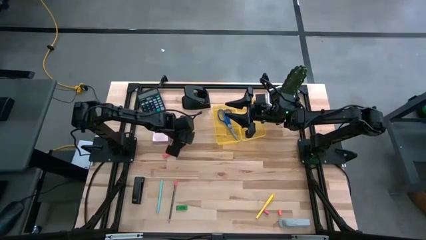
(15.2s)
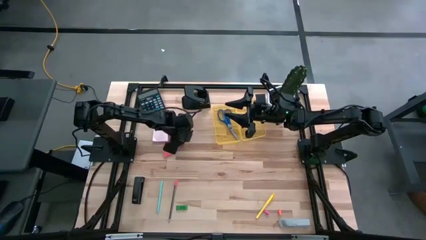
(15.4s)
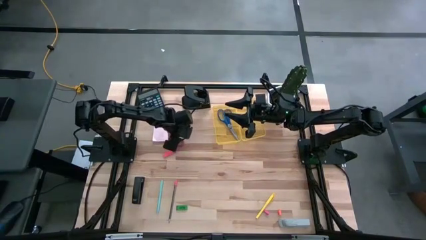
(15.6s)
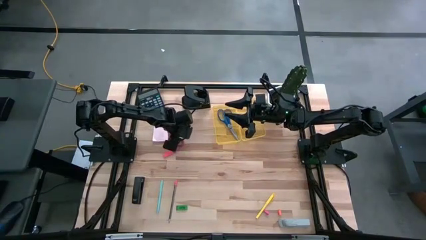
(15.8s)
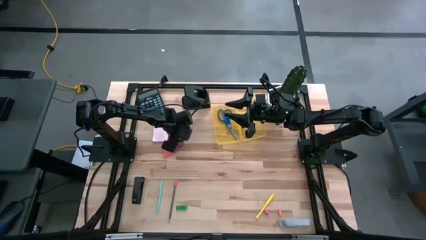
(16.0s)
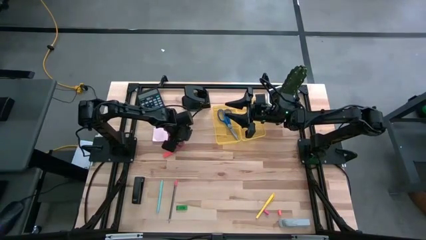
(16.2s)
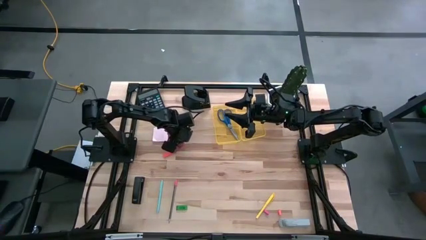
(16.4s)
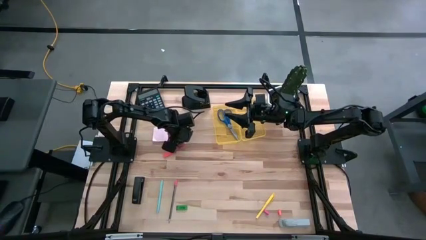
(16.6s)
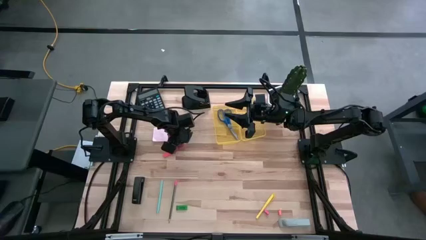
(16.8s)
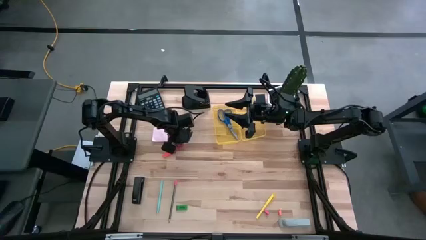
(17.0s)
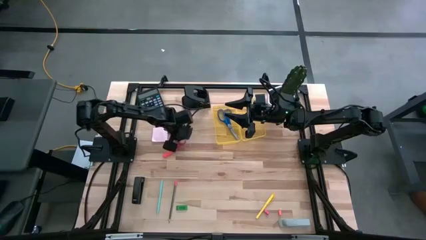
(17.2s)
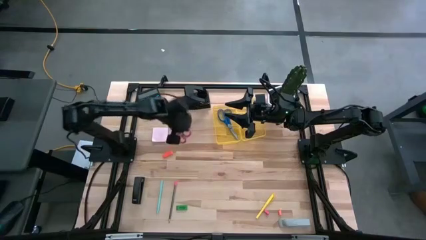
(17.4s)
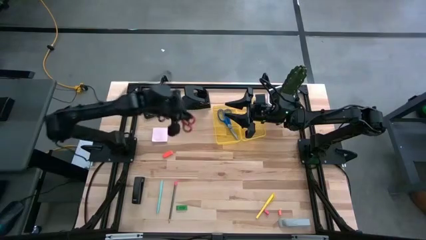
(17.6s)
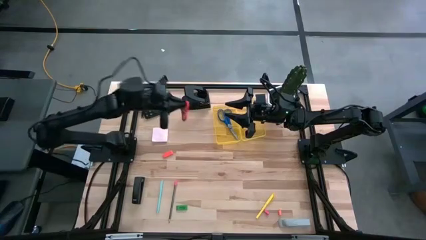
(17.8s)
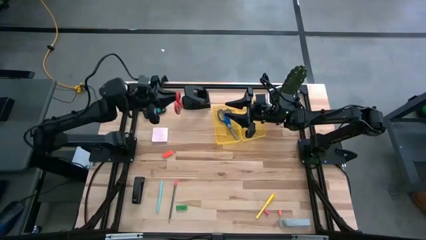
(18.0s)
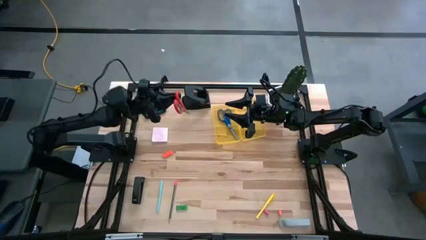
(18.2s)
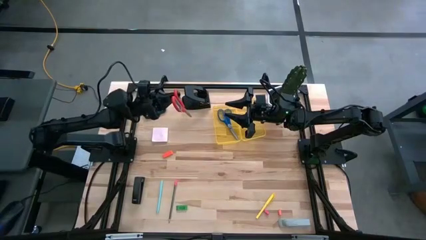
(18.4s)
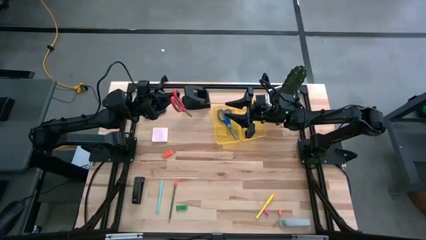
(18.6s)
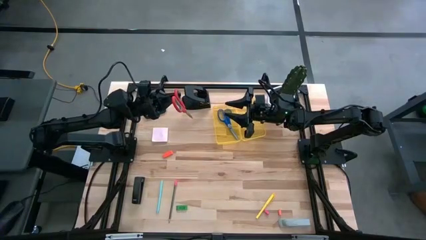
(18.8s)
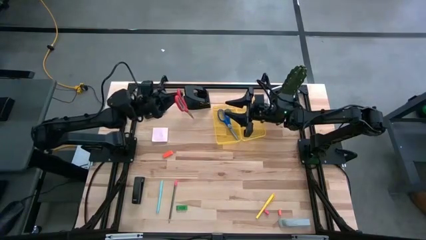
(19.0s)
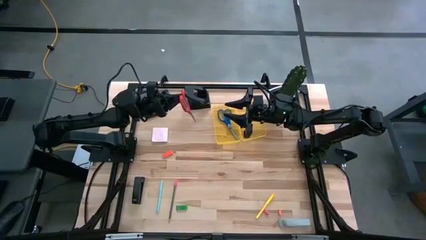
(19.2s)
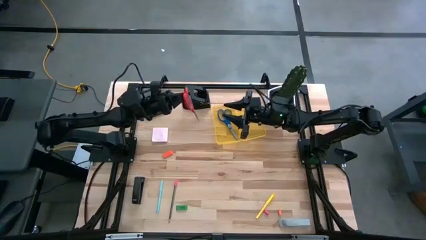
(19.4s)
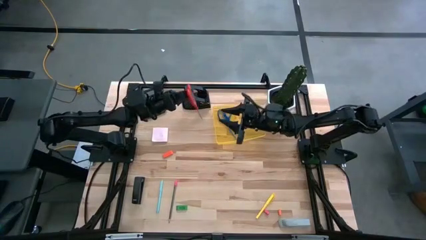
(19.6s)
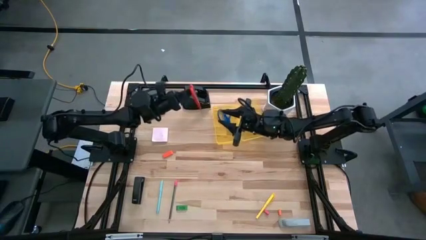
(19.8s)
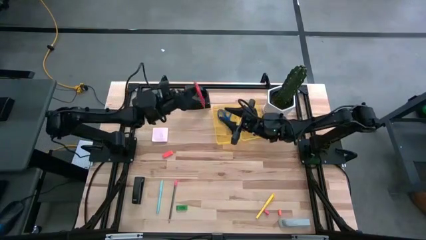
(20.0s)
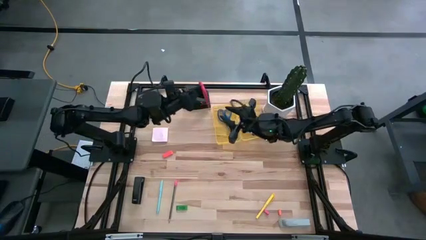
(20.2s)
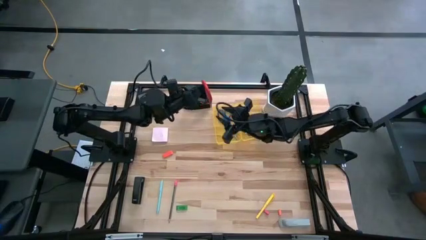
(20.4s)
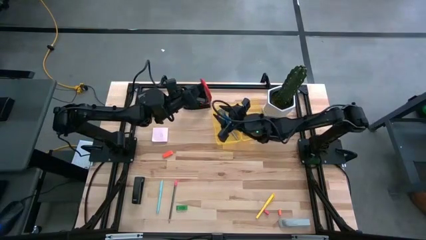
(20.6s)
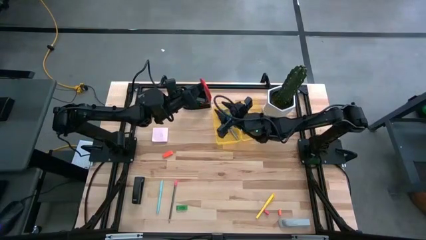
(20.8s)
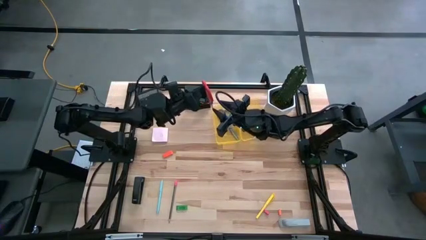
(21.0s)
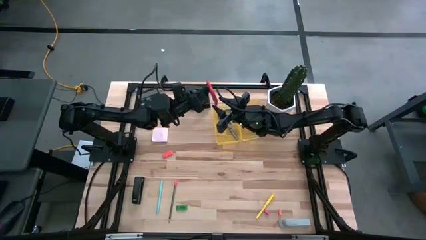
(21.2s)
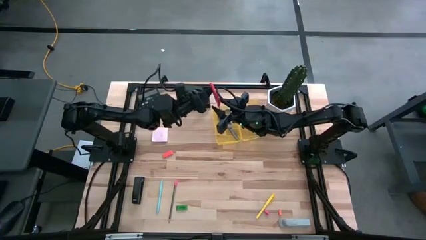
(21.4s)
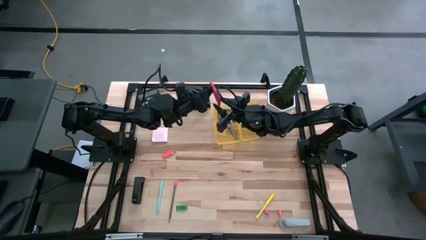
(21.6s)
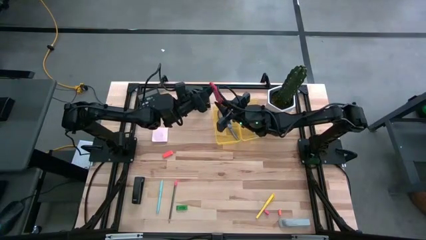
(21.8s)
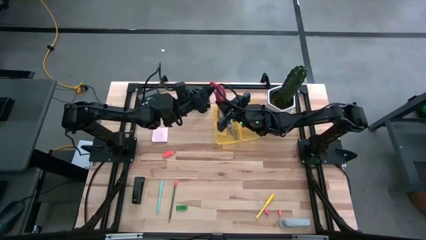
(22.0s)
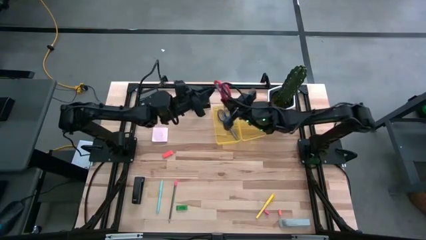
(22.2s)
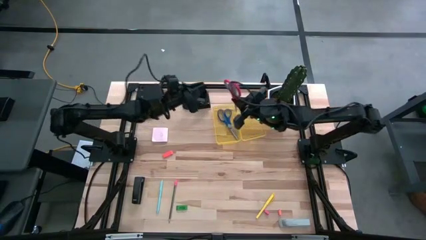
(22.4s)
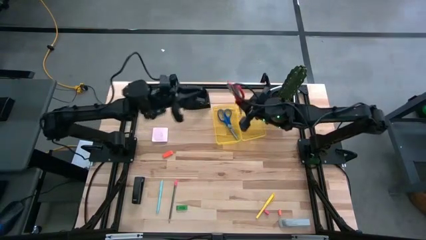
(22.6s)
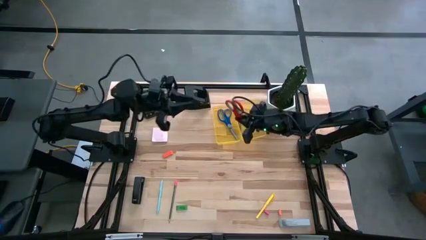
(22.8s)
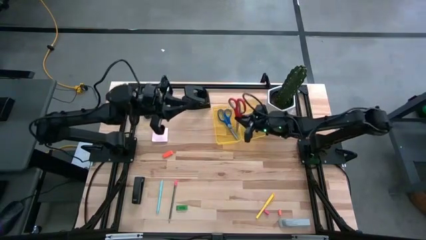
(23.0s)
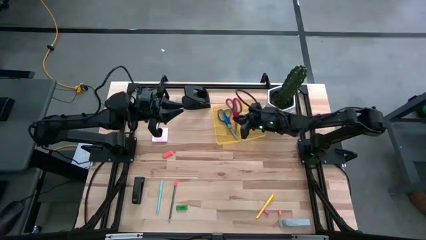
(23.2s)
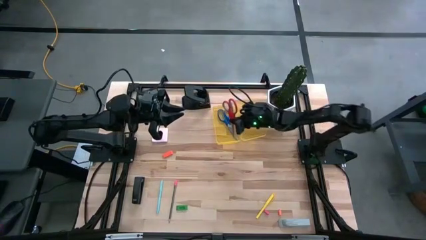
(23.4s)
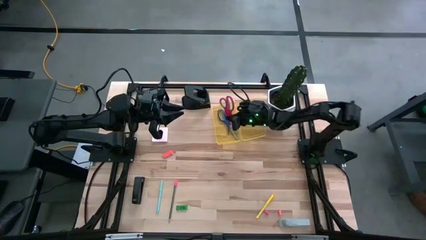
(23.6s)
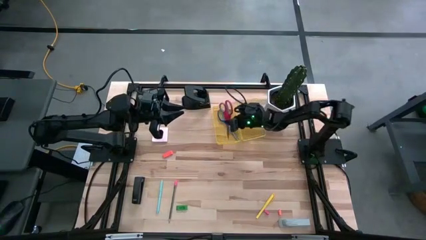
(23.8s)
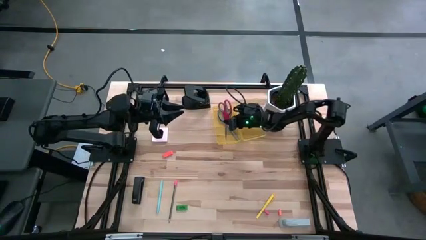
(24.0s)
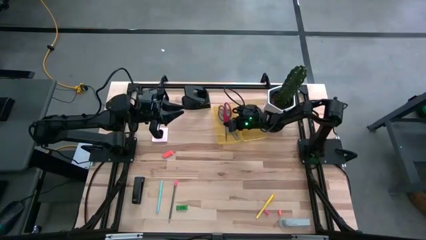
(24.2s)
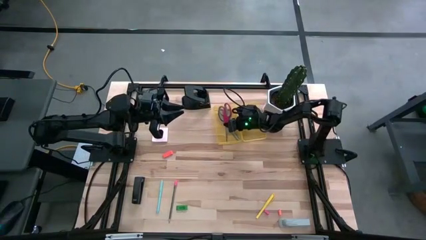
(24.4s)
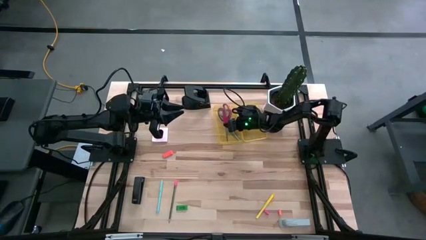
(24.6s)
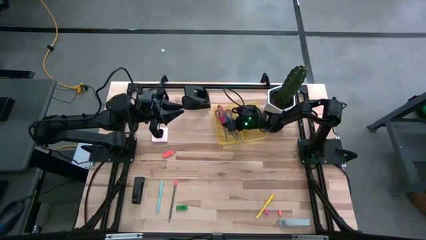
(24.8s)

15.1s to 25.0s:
Task: Pack school essentials
Put the red scissors into the yellow supply box

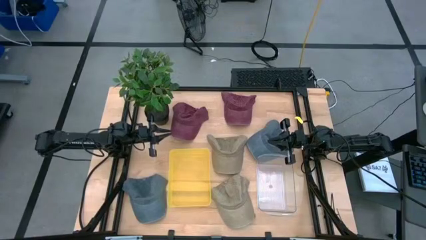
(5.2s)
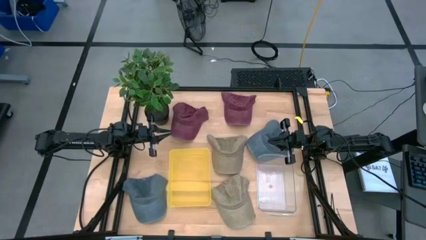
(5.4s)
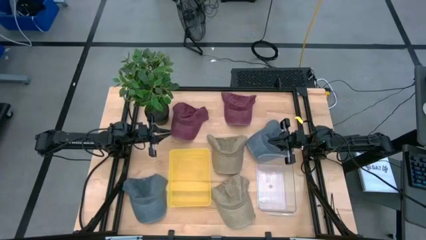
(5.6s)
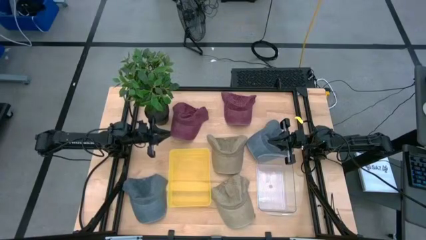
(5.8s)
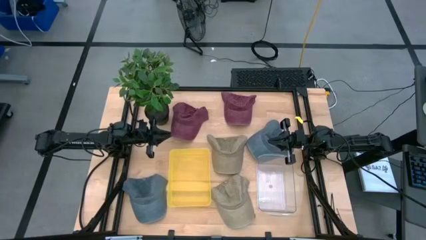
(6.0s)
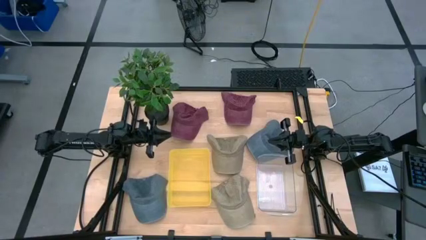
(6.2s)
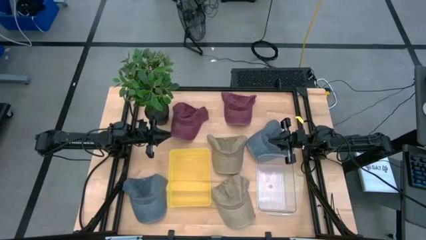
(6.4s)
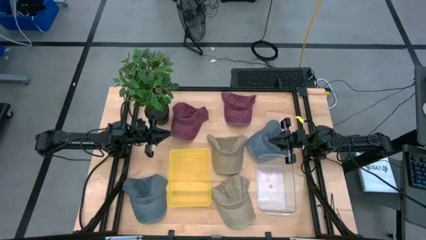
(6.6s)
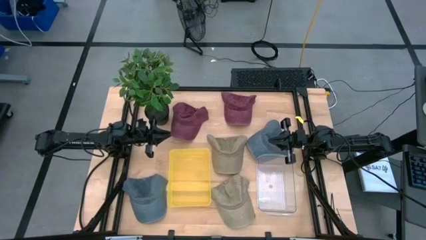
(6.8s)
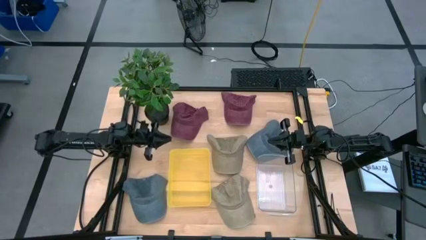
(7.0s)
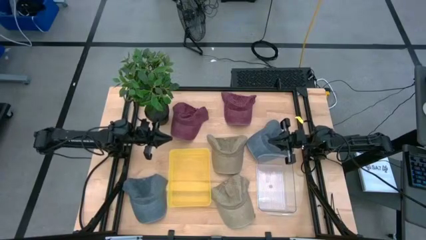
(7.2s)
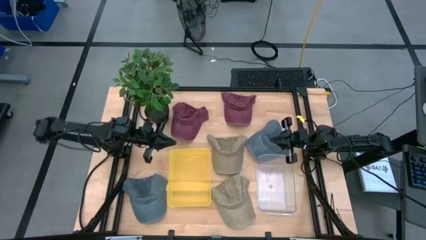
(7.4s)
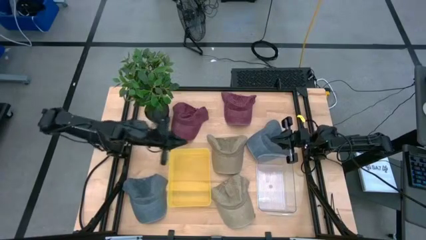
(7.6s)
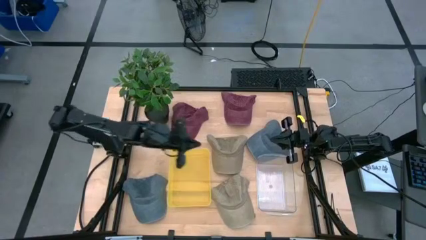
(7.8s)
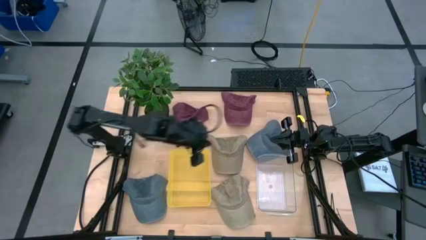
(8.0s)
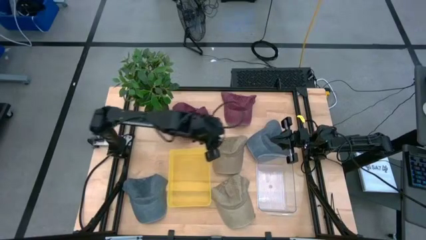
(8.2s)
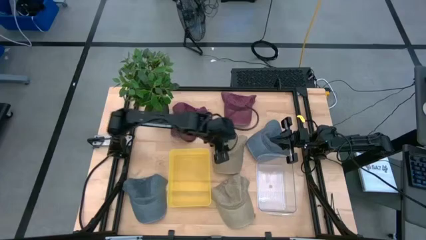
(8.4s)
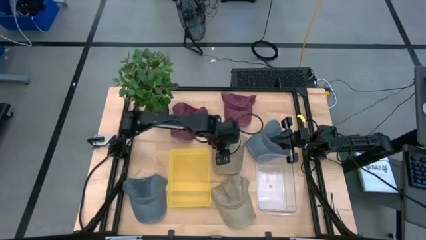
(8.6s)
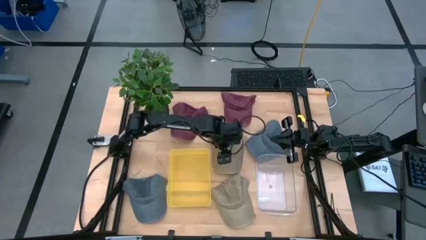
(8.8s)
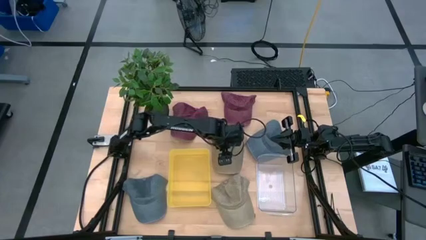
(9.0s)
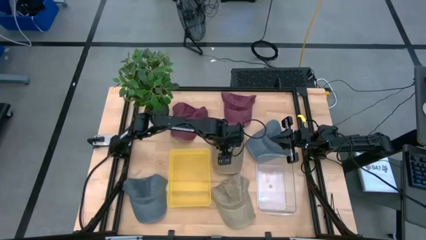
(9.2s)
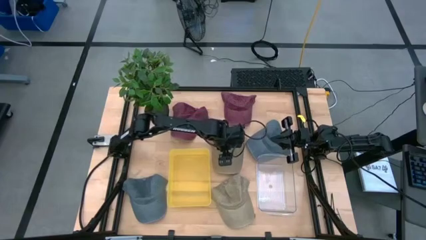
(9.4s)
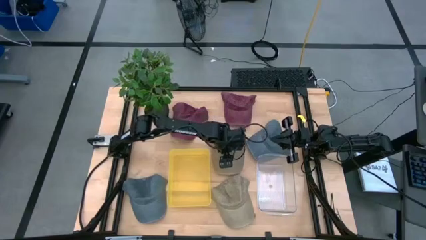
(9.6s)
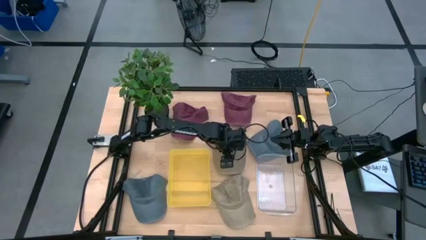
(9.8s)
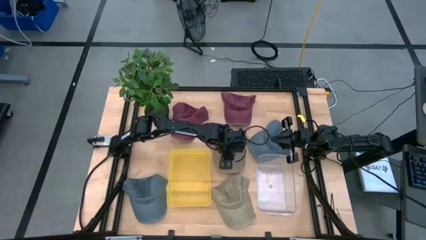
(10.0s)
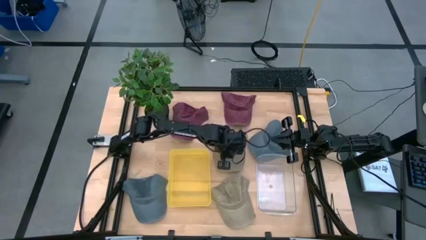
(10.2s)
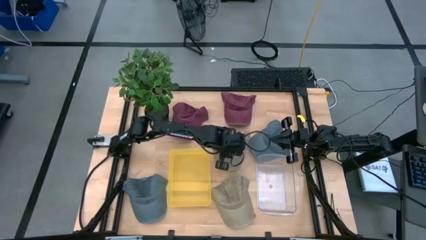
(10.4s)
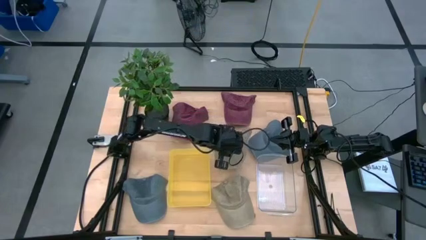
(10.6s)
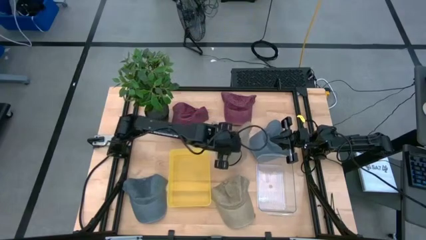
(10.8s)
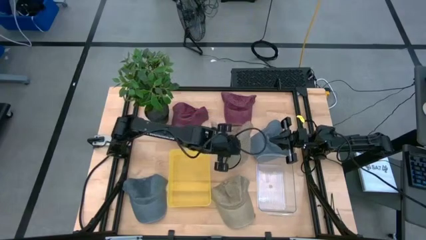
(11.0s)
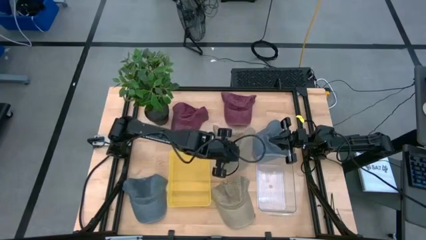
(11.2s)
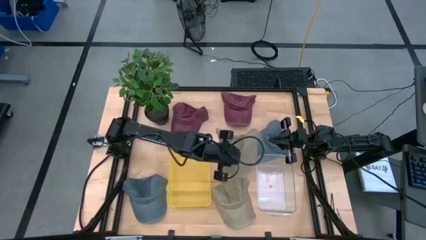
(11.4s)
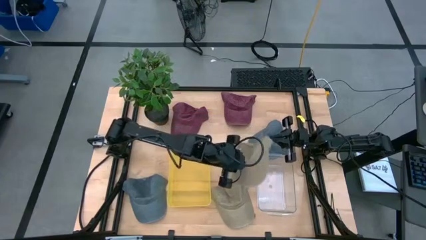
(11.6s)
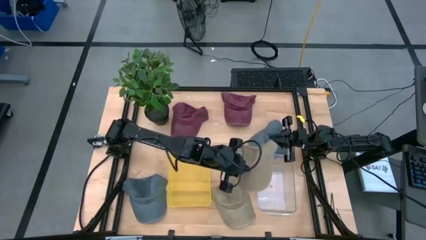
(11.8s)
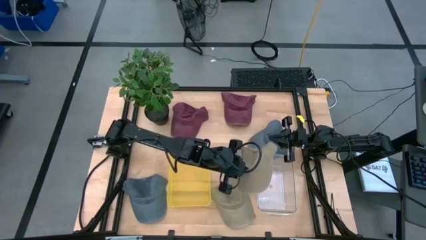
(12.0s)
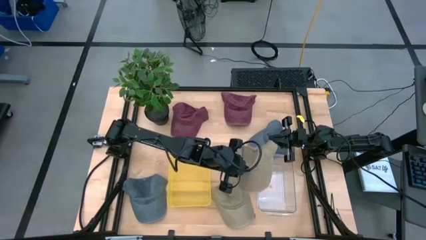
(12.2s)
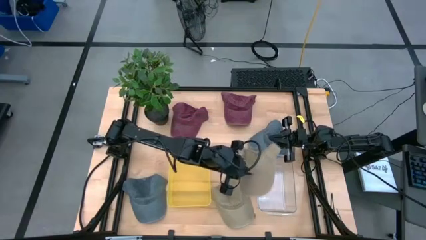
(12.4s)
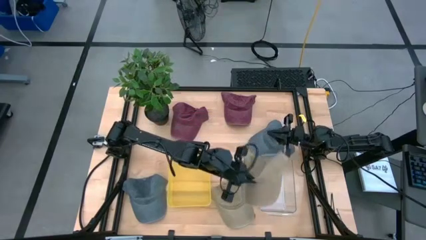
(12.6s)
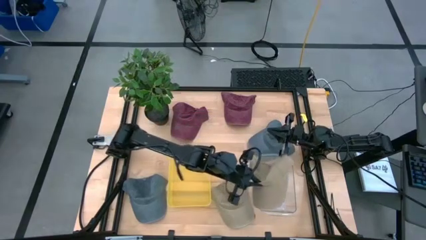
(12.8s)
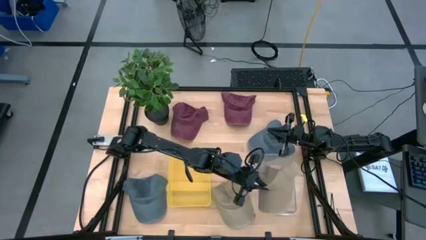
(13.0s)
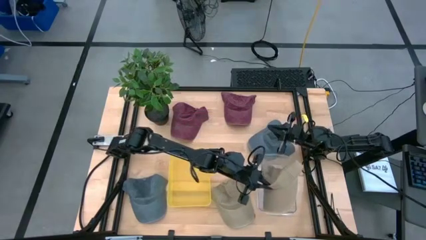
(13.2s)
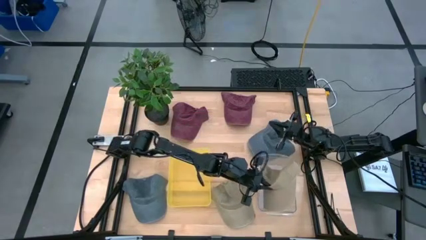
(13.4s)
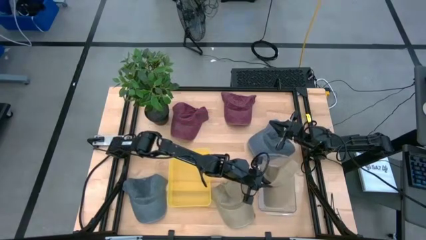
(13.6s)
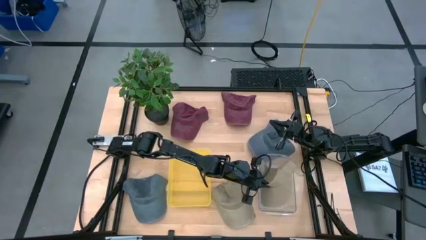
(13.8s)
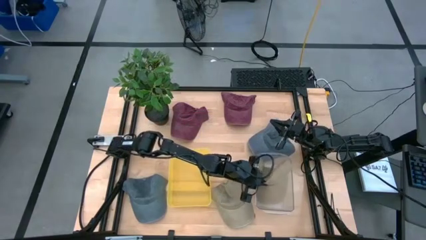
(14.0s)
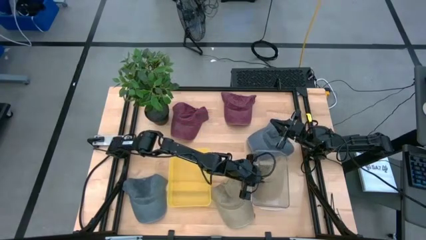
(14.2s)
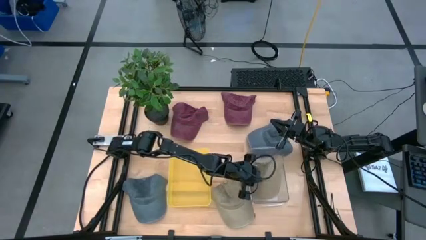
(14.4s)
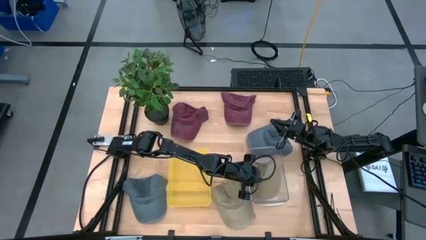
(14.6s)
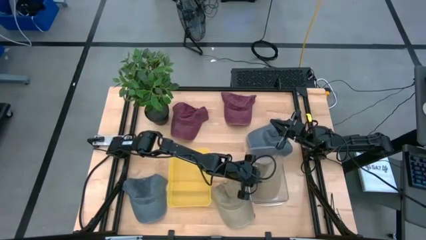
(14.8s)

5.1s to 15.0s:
Task: Pick & Place hat
Put the top brown cap into the transparent bin
